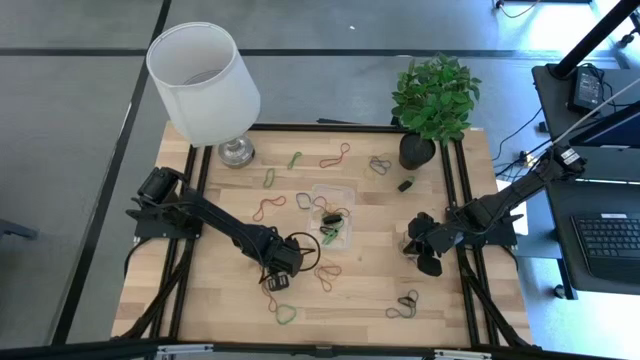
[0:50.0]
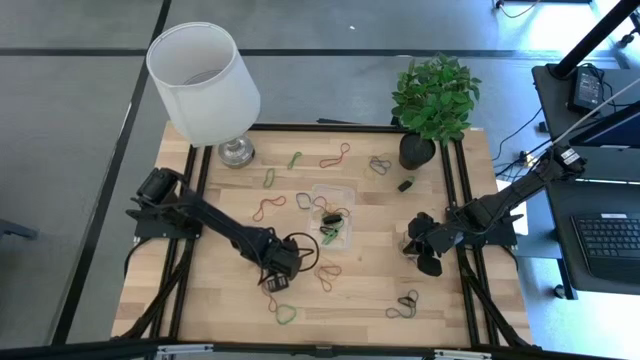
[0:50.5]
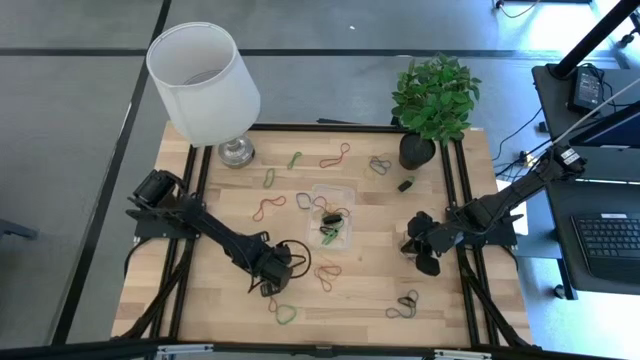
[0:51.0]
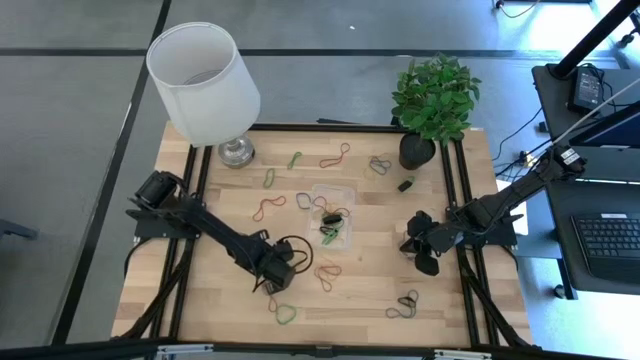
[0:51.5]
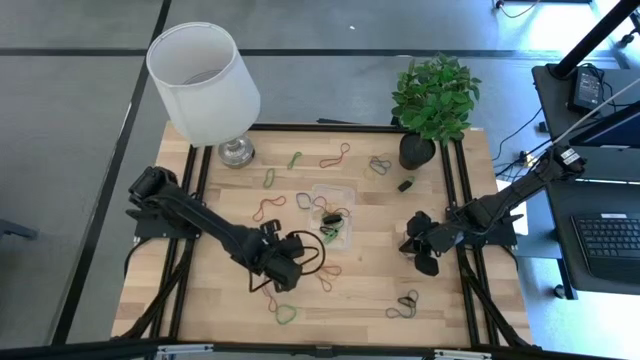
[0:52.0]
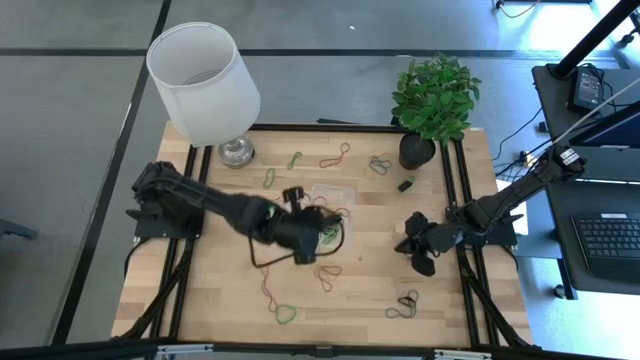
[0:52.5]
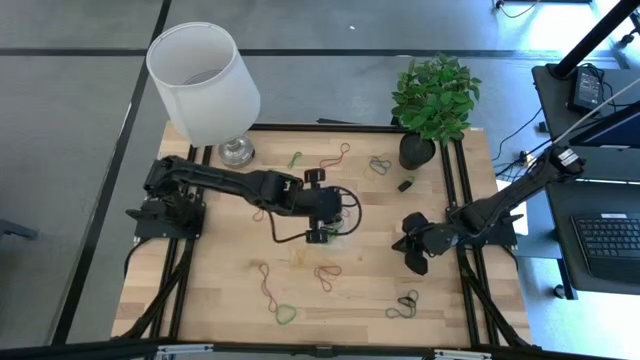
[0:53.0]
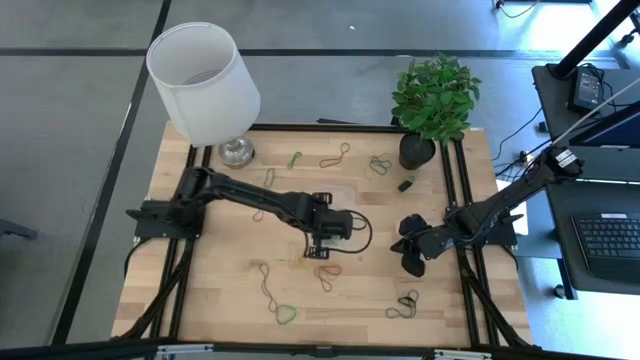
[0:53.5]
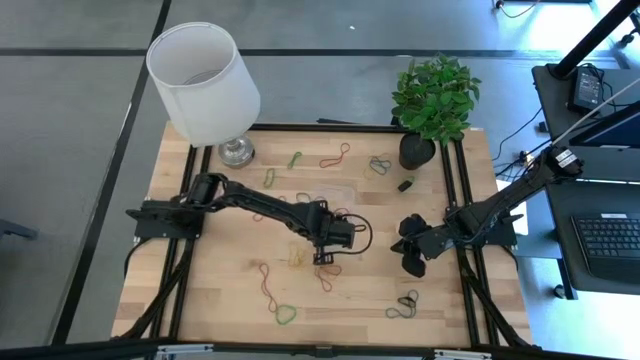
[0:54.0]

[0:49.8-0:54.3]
Task: Pick and place rubber bands into bin
Put the blue rubber band into the bin

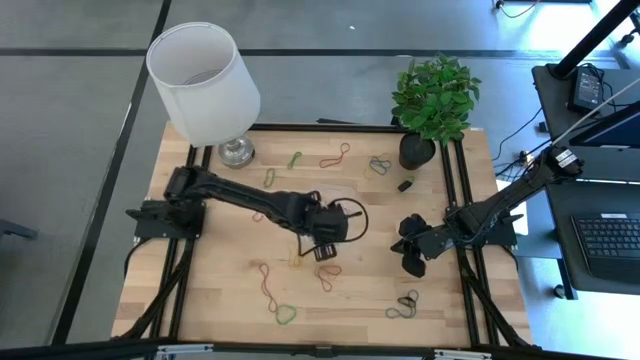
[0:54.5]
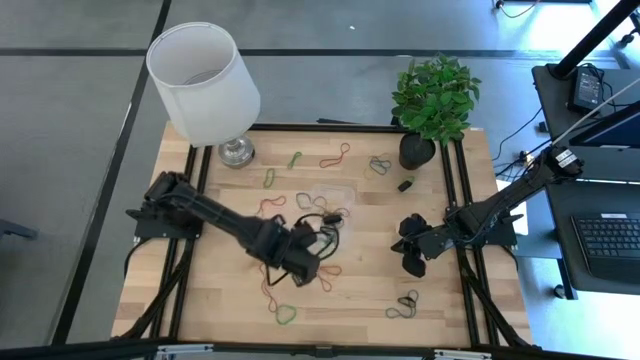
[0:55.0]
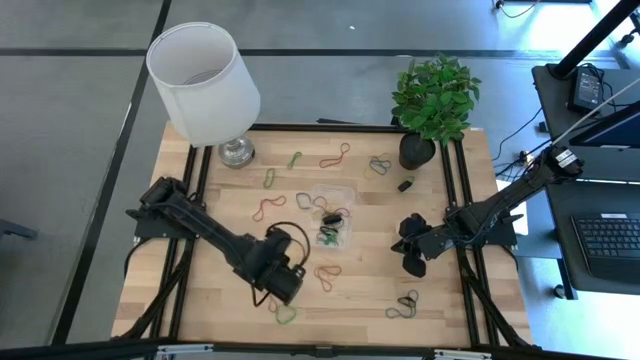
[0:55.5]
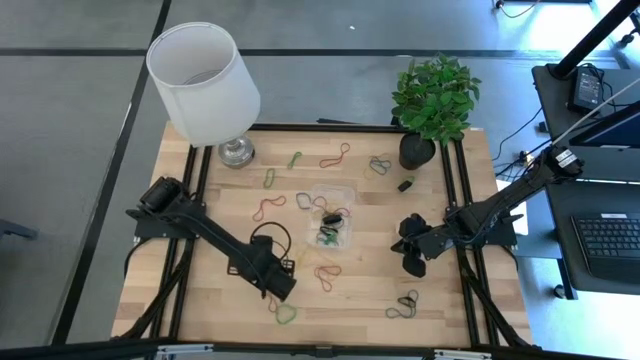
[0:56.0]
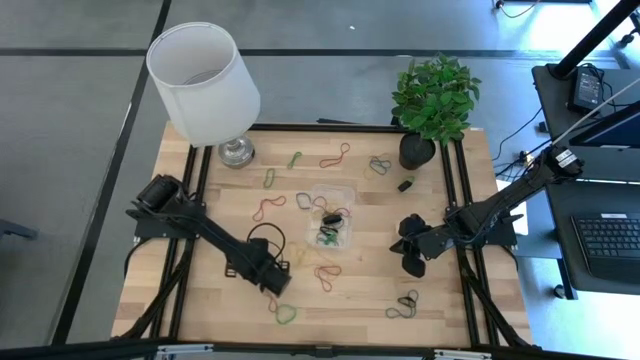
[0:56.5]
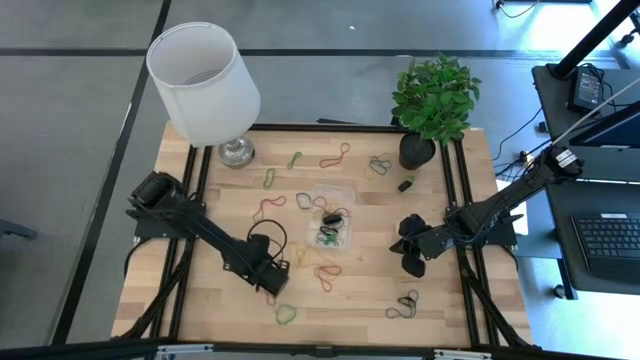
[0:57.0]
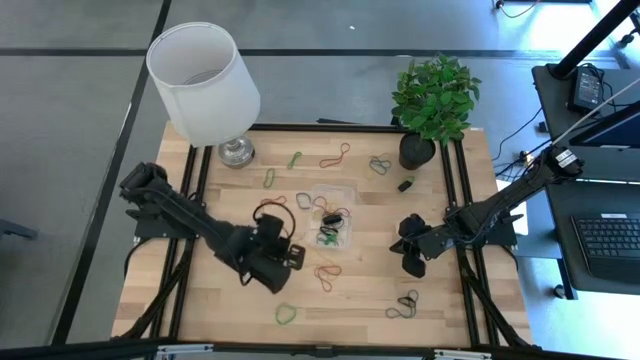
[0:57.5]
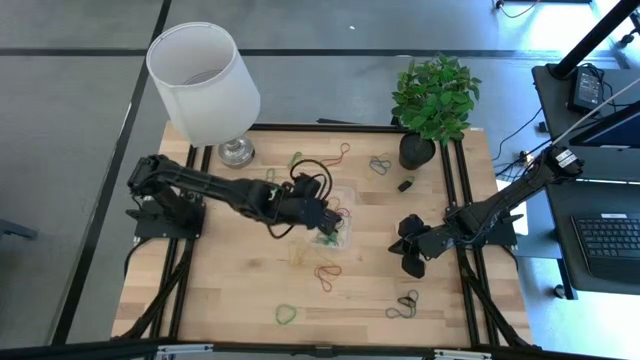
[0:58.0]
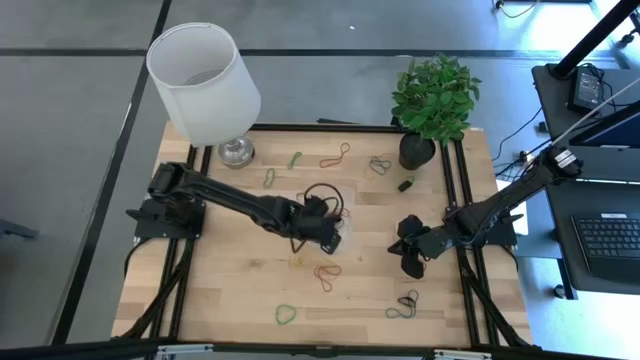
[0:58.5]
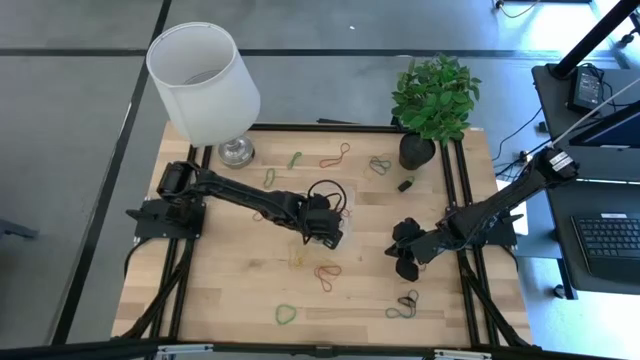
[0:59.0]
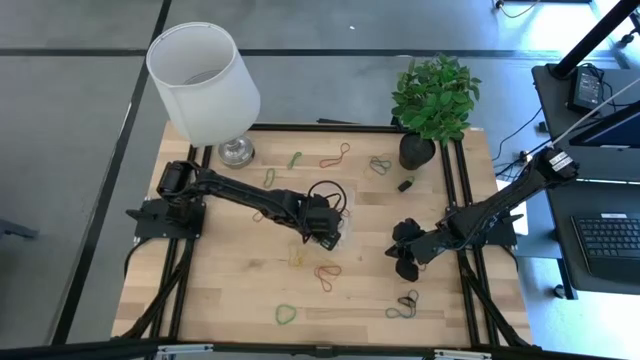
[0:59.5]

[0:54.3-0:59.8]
Put the red rubber band into the bin

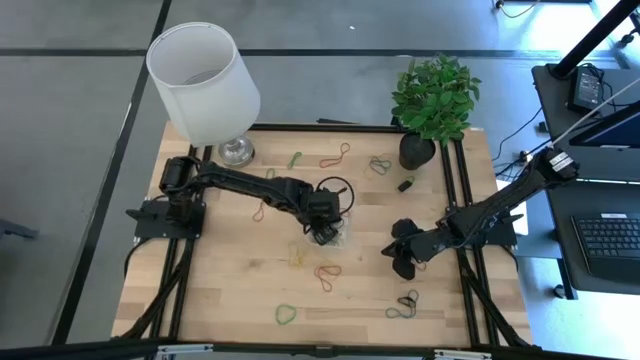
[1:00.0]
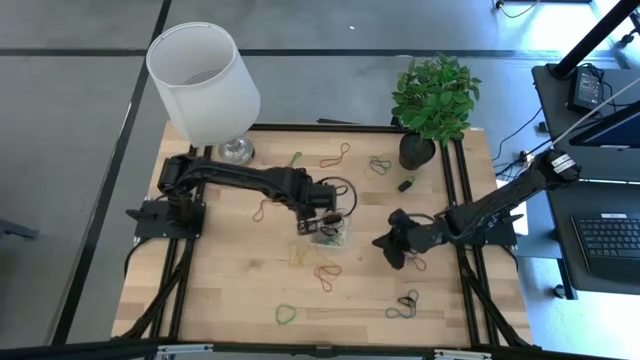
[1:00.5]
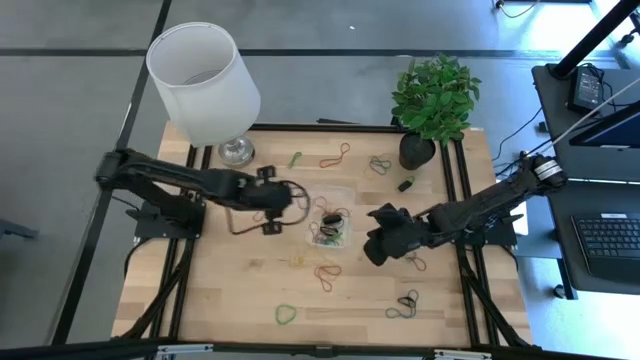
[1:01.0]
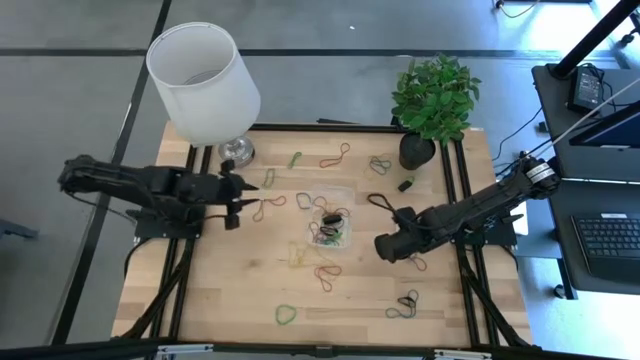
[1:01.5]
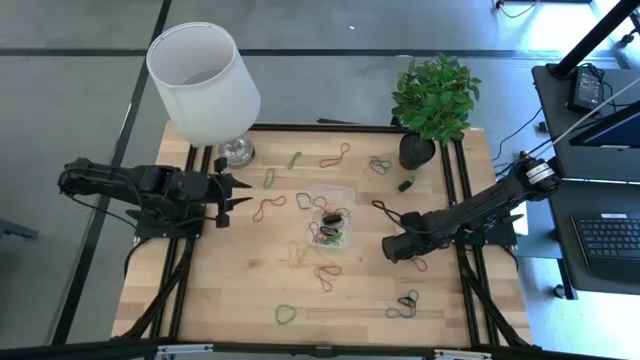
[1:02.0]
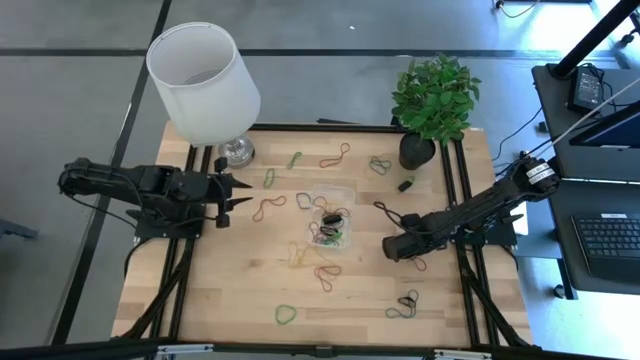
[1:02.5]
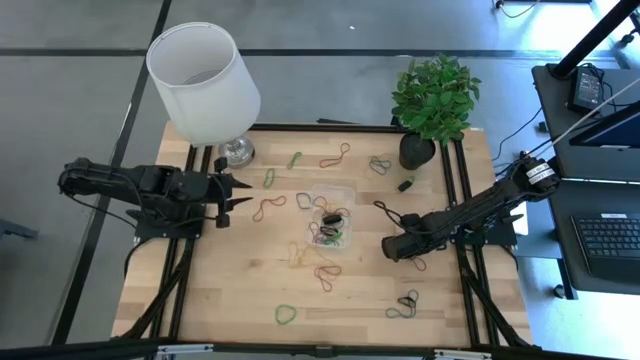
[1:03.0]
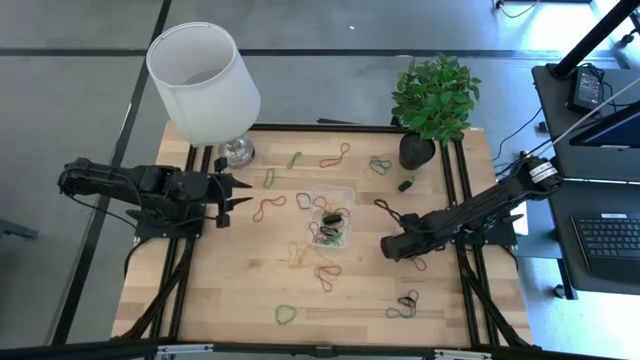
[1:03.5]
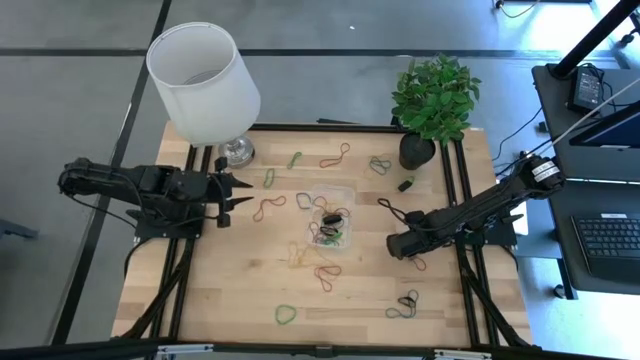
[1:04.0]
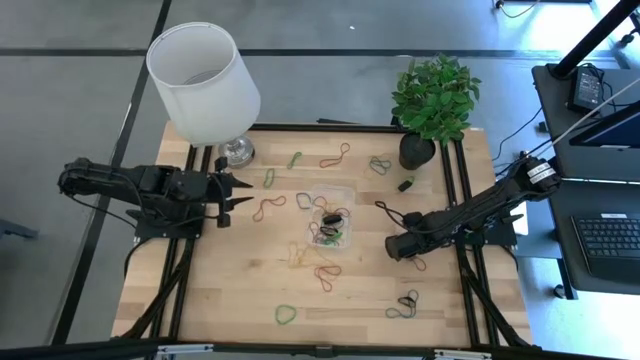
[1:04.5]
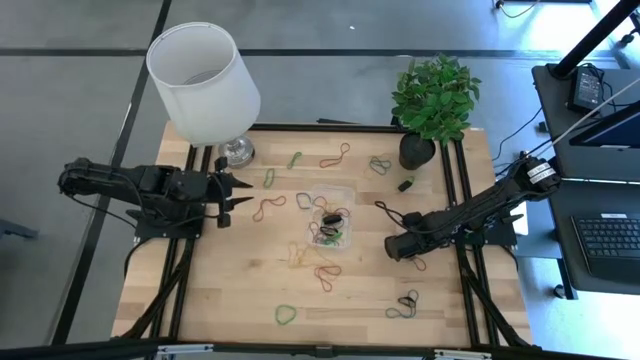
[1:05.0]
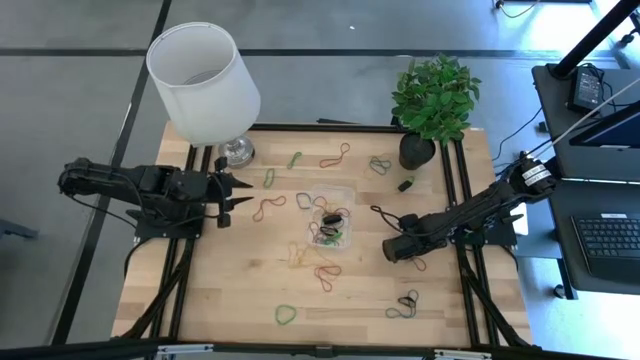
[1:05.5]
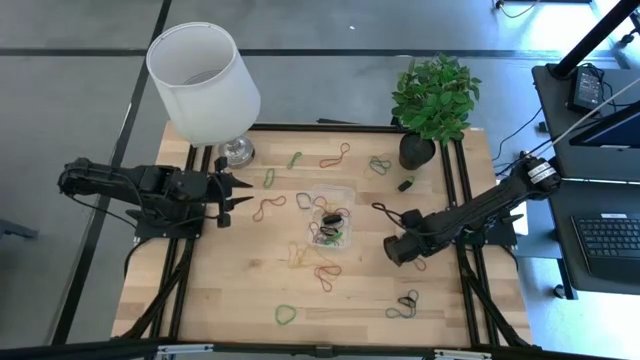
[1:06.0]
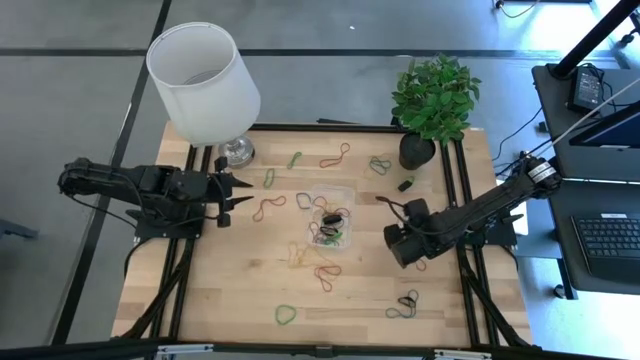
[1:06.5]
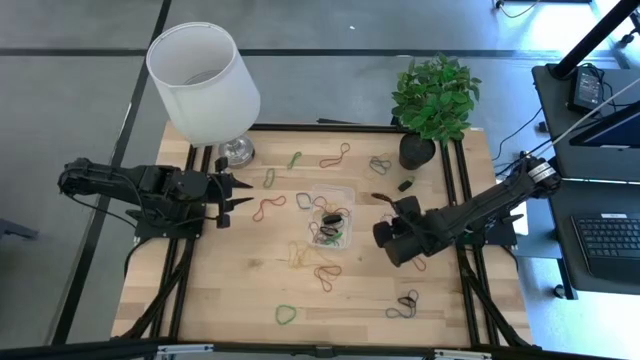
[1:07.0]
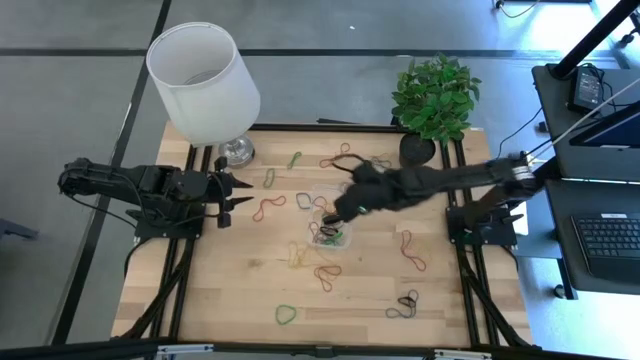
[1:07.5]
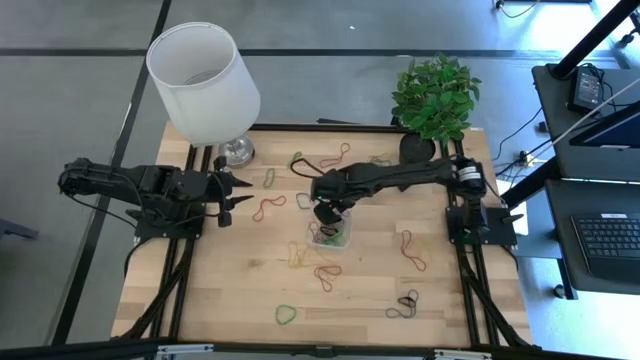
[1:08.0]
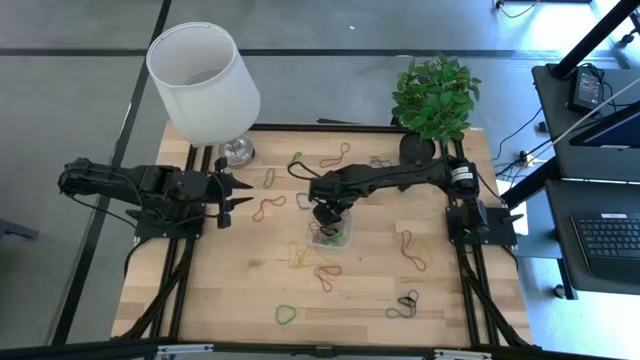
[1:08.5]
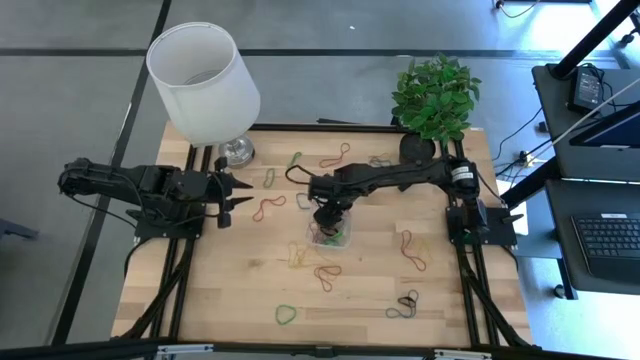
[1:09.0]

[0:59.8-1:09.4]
Put the blue rubber band into the bin

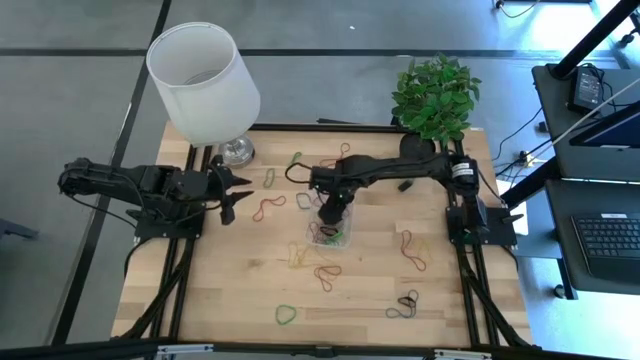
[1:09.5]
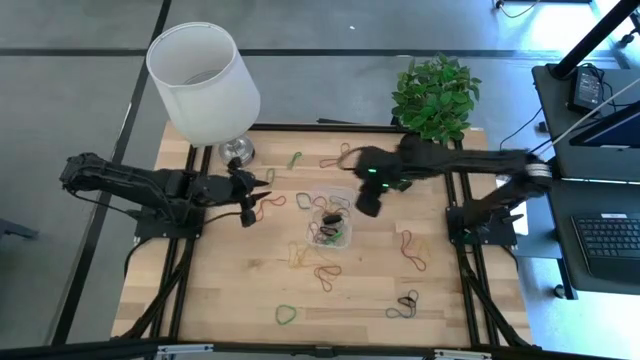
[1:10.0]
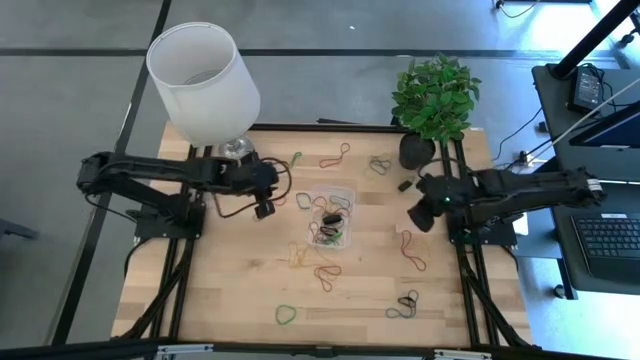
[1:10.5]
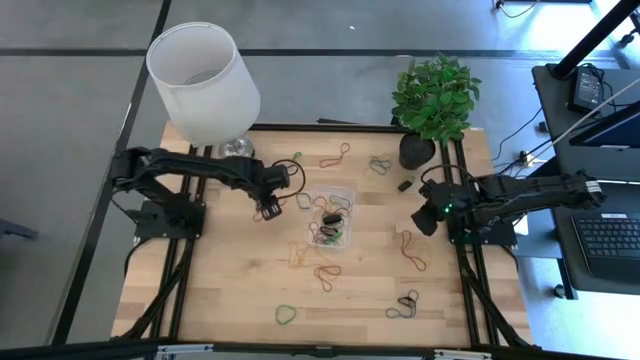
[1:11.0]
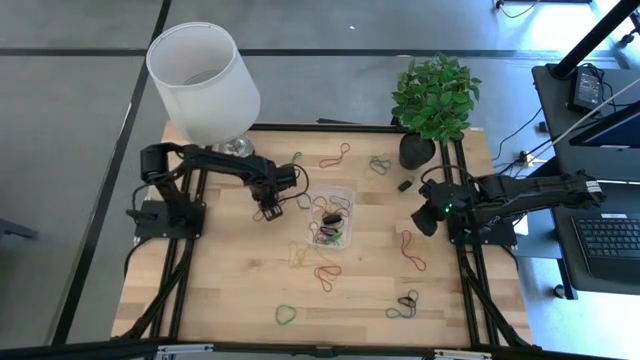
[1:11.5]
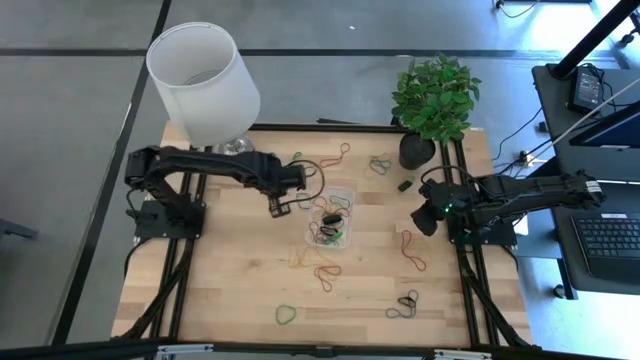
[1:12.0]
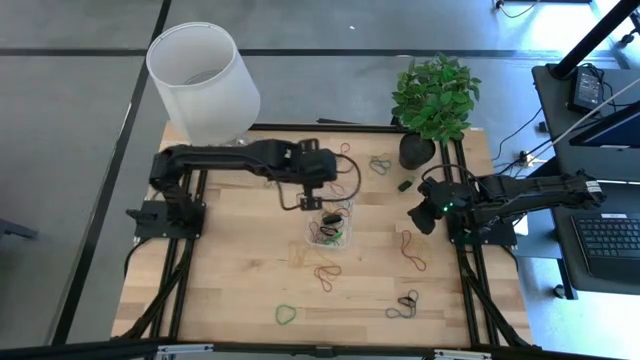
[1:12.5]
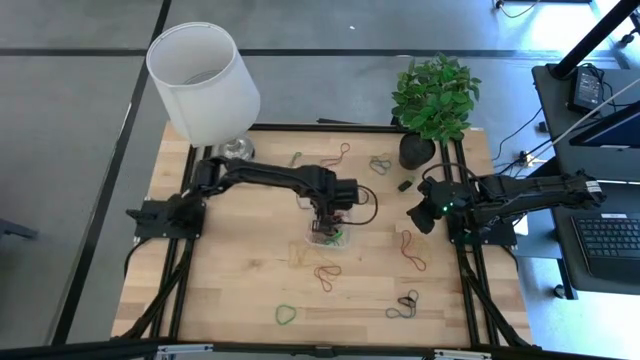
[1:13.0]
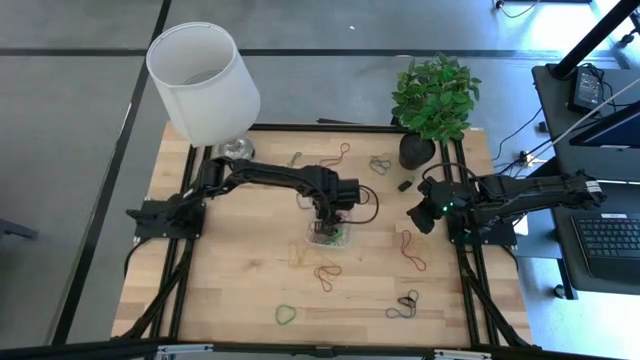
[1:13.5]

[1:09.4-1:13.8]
Put the red rubber band into the bin
